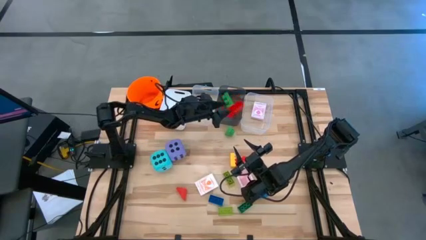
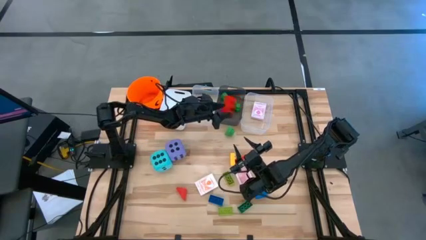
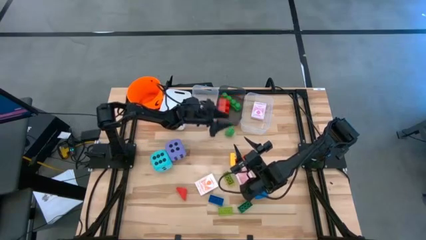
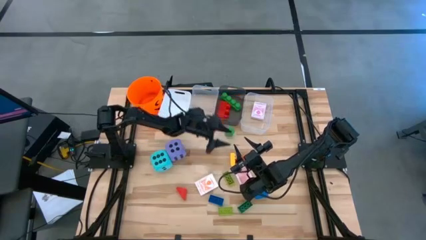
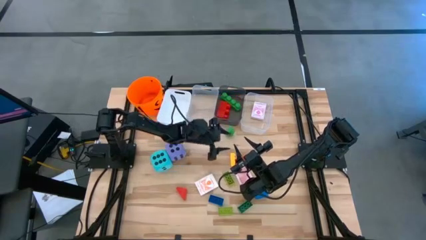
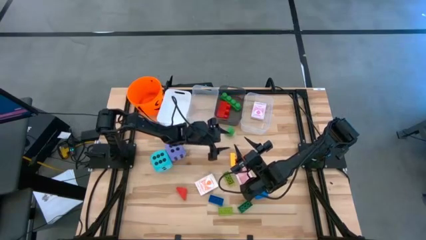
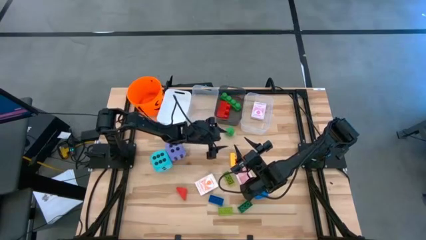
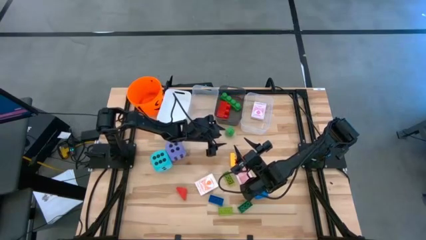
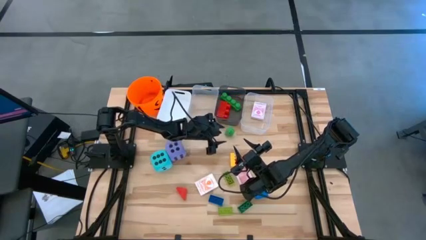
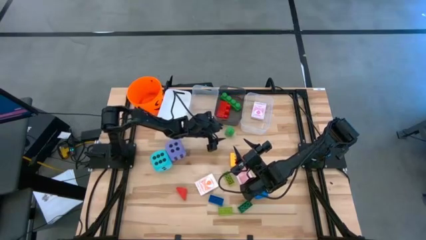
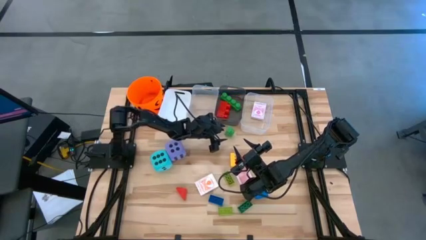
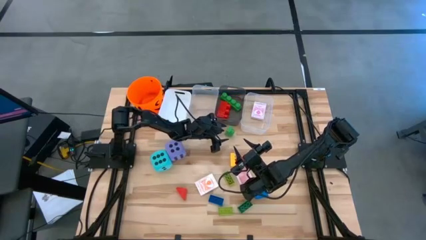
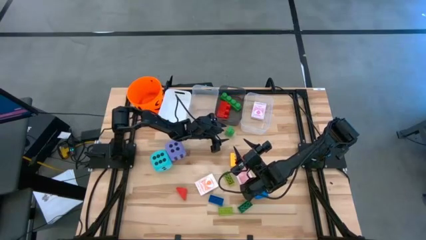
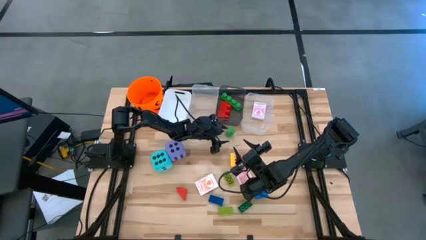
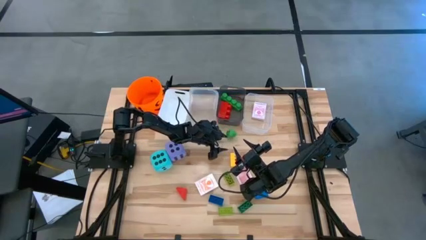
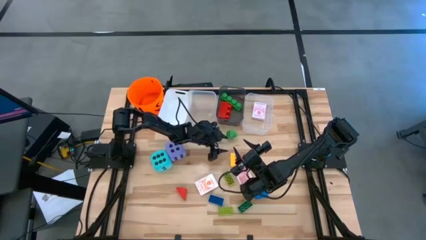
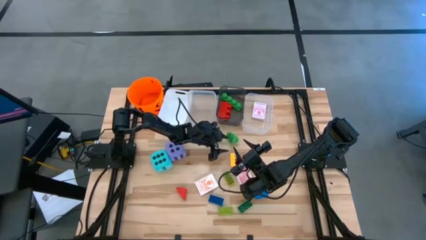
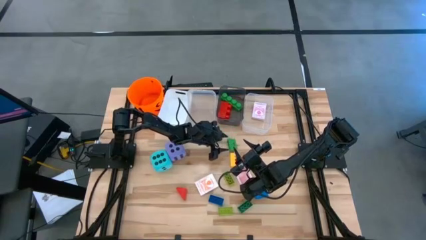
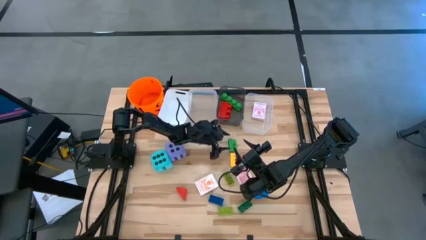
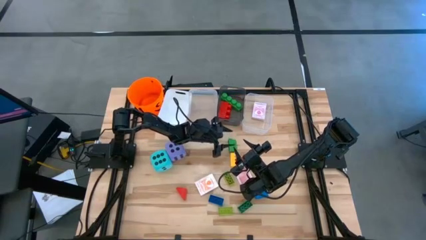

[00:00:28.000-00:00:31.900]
Task: Pick & Place Toys
Put the large top green game piece into the black bin

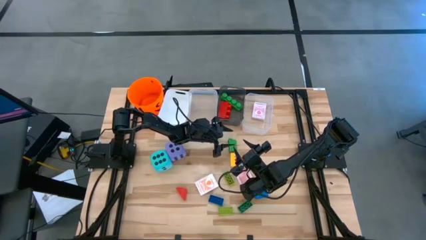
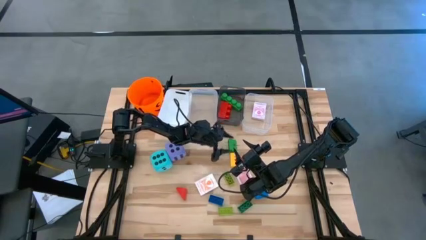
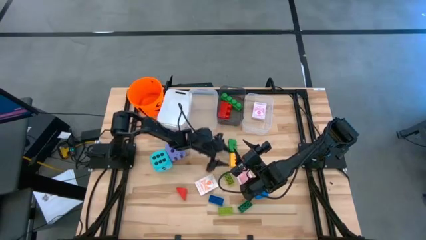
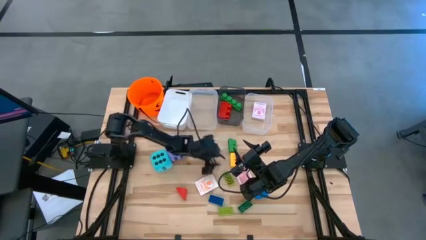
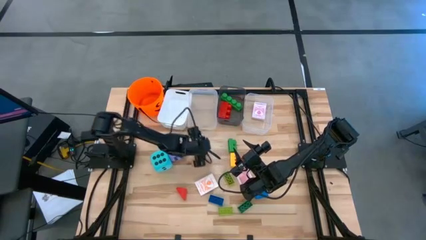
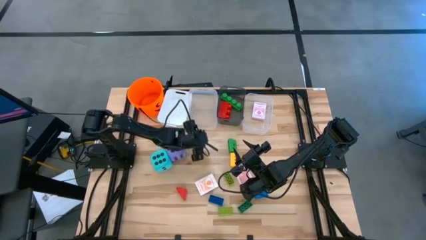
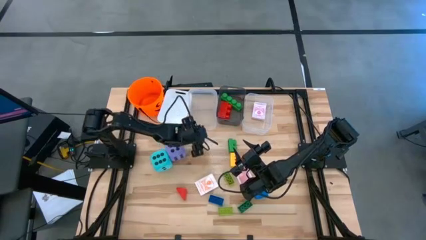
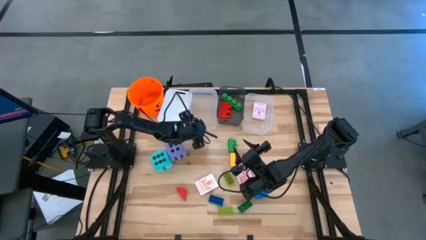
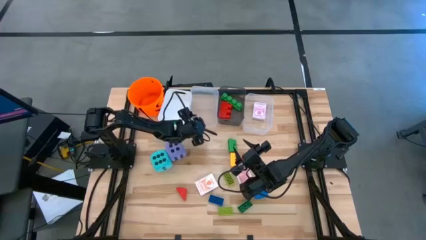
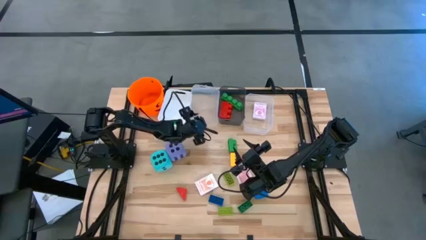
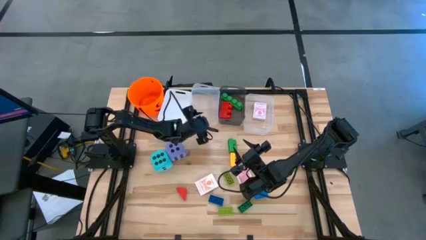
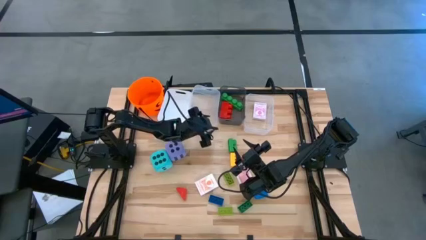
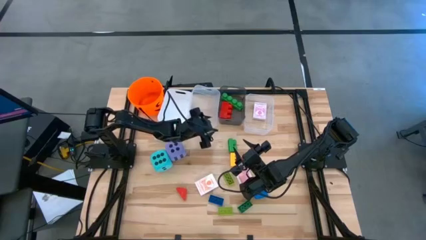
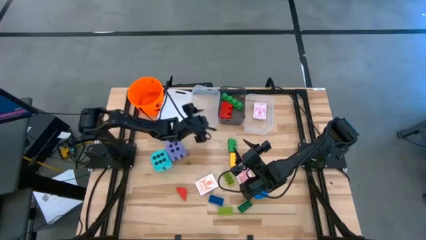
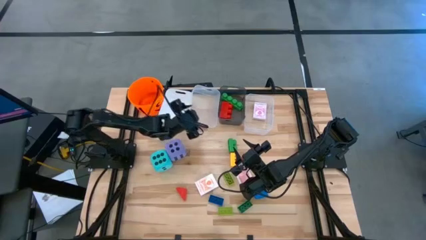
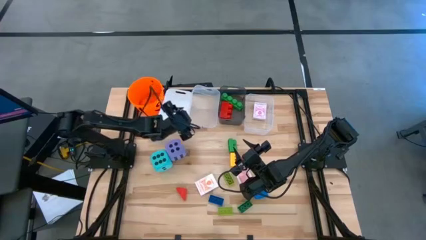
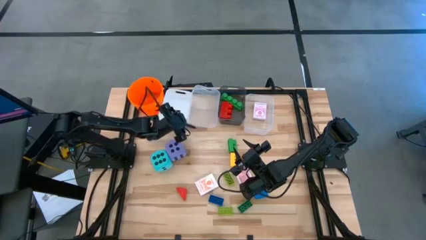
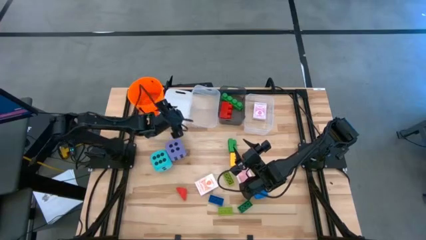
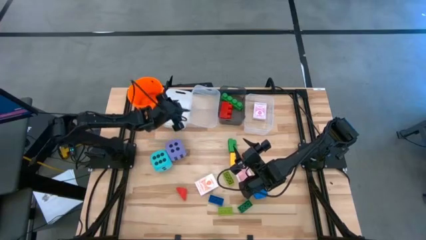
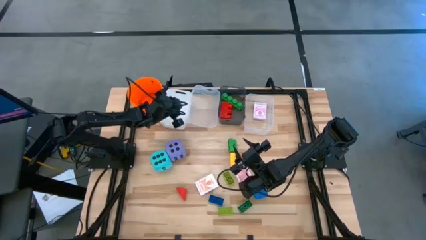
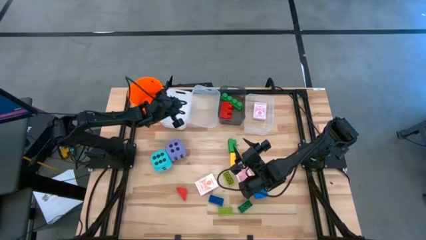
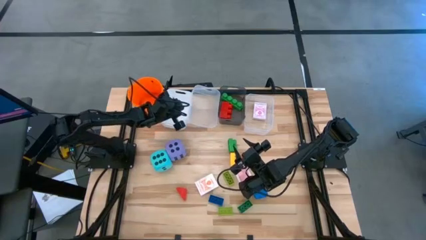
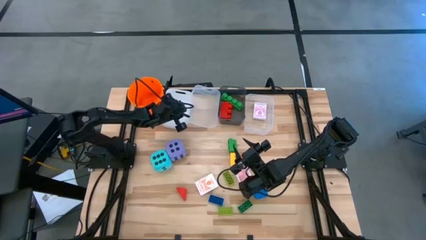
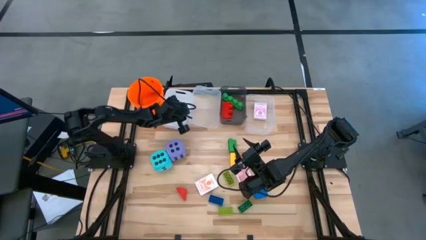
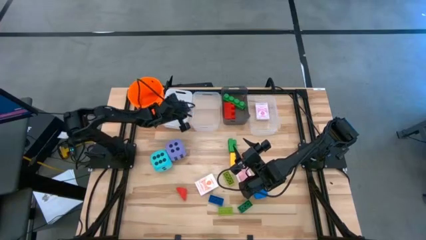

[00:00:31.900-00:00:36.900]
Adjust the left transparent bin

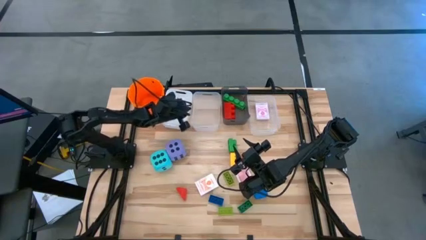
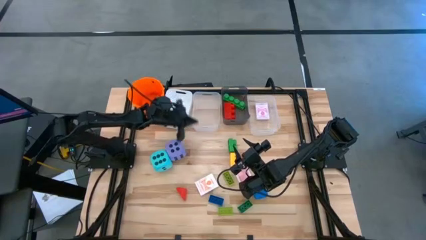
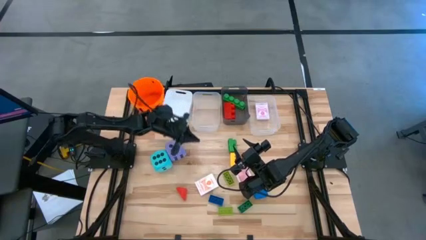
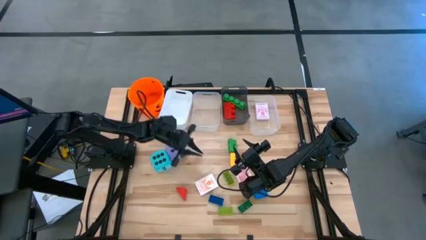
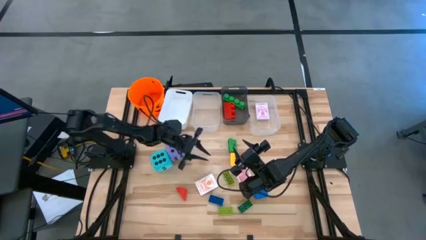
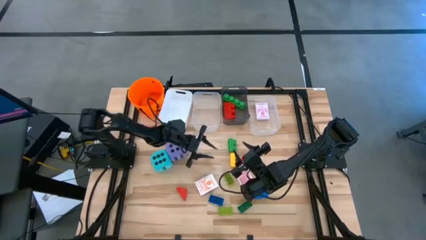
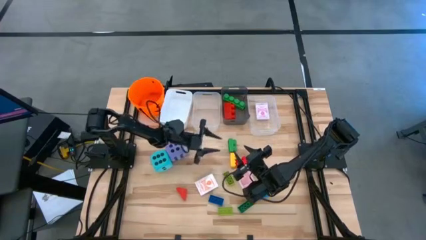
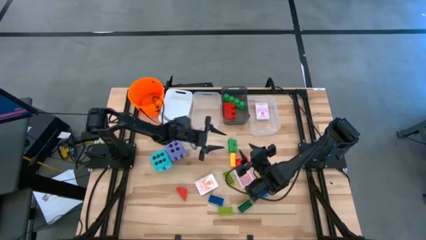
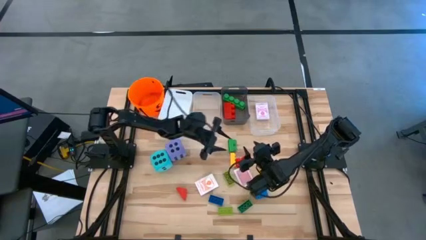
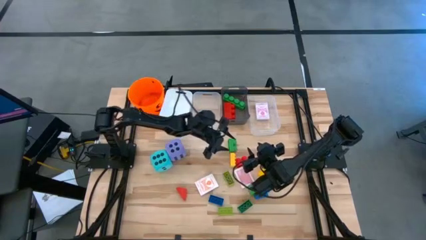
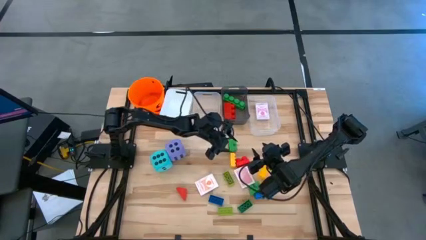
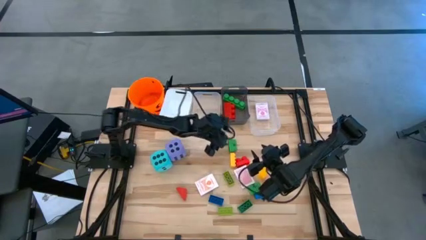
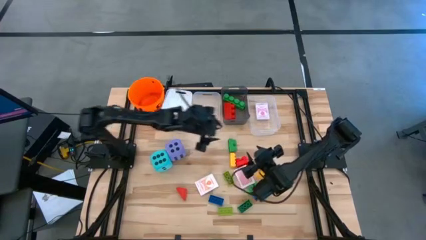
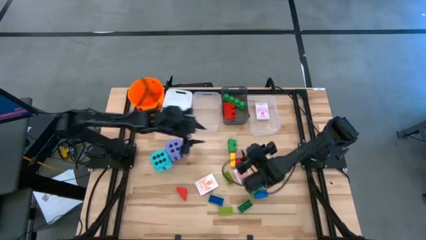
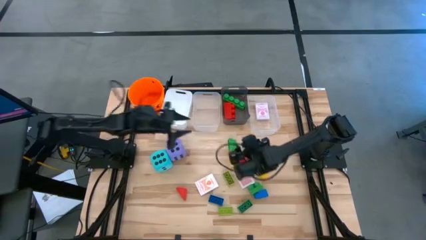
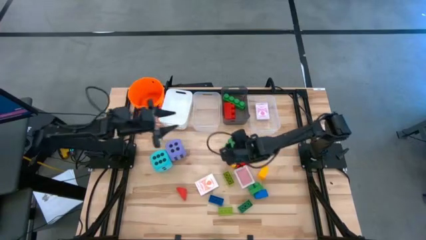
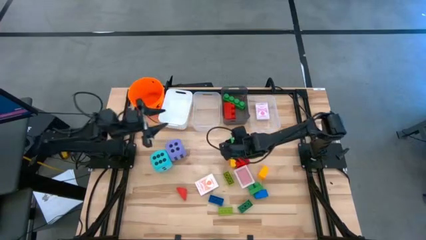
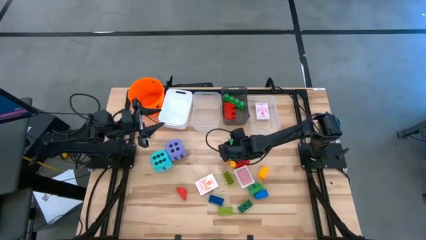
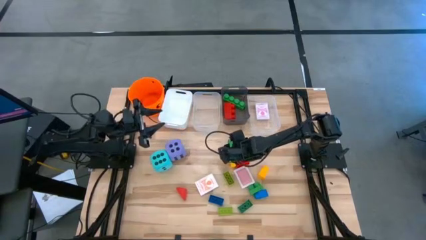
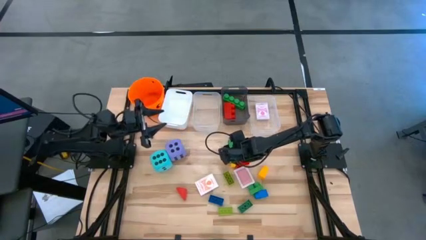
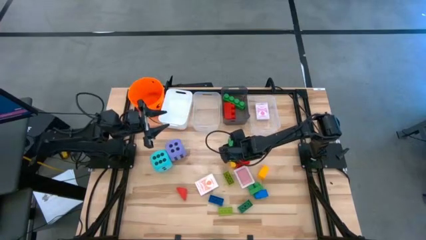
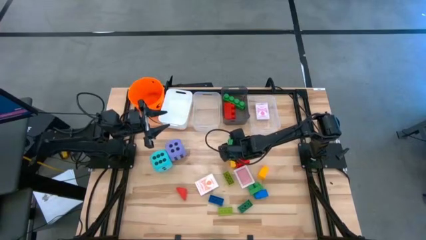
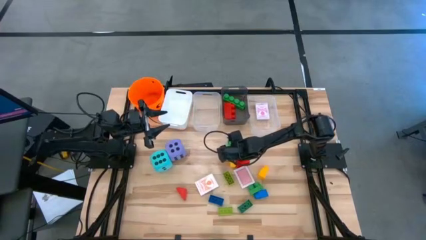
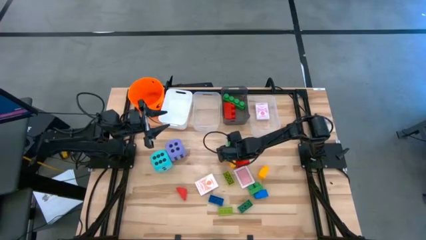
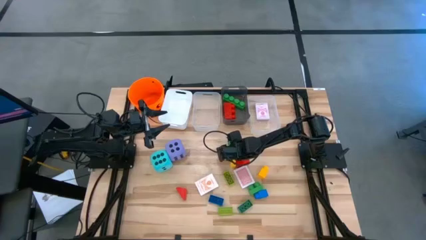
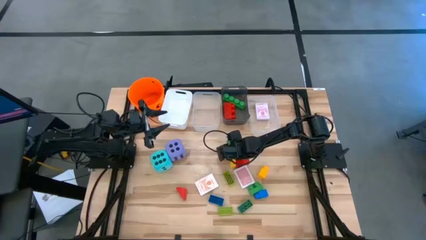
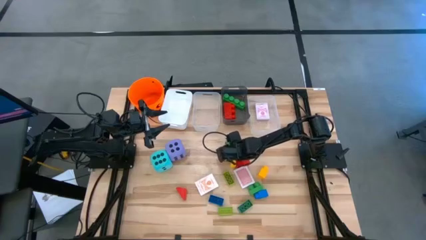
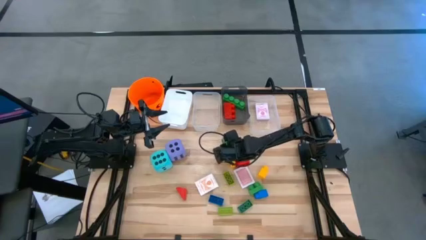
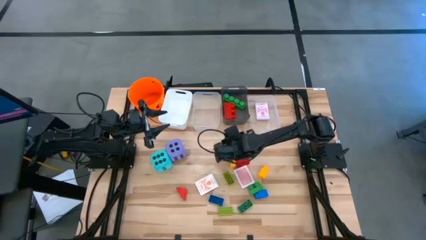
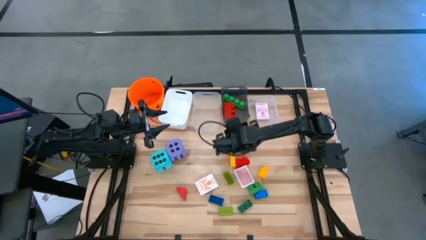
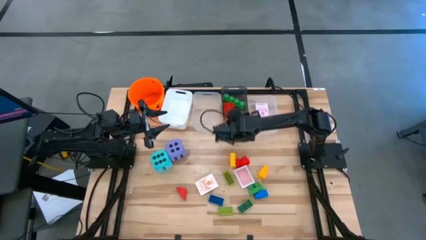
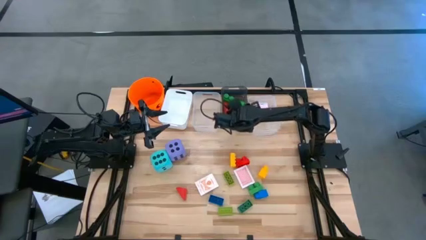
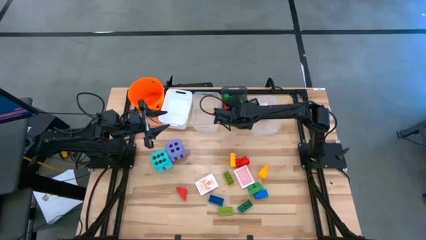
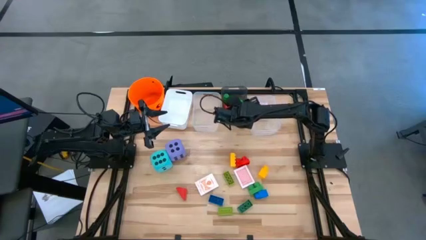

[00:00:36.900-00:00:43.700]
Put the large top green game piece into the black bin

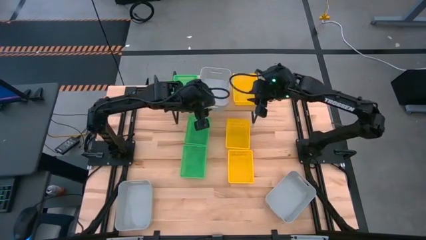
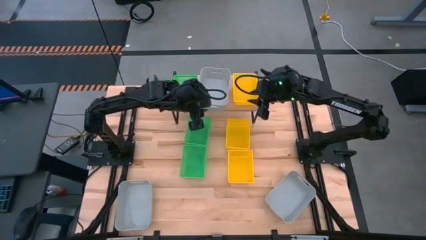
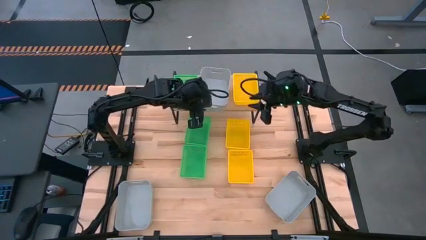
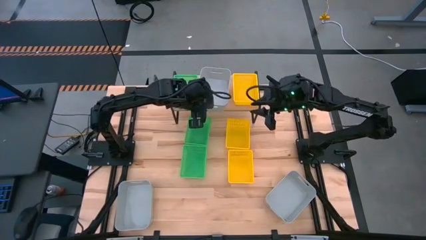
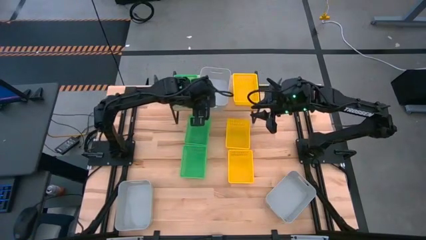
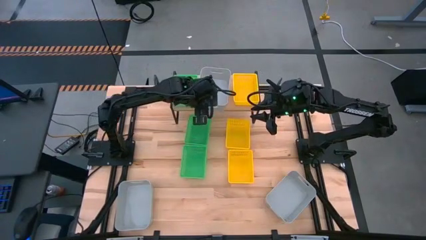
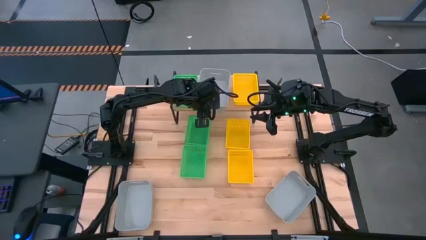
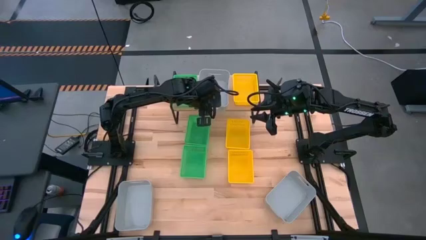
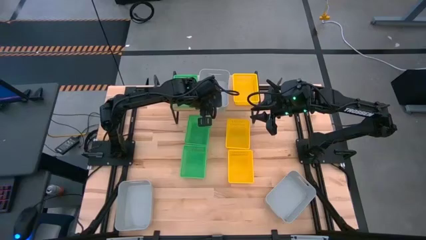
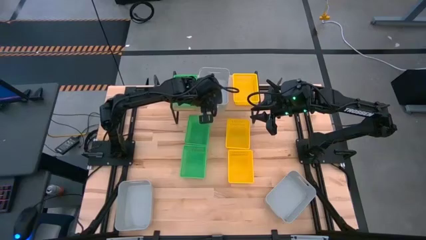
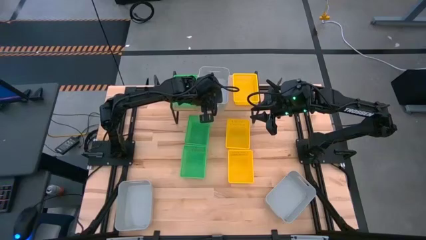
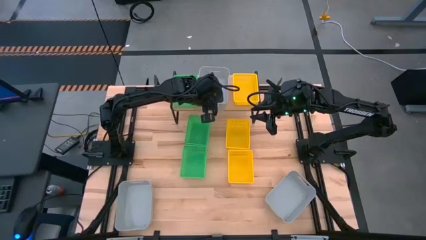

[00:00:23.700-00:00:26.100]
Task: Stack baskets on shelf by color
Adjust the gray bin on the shelf
